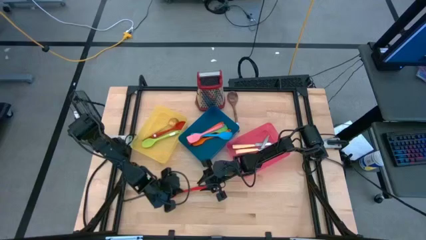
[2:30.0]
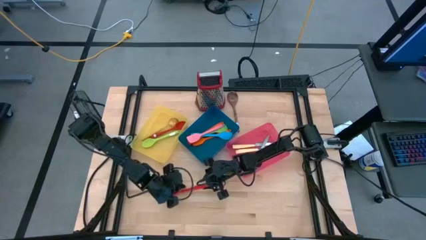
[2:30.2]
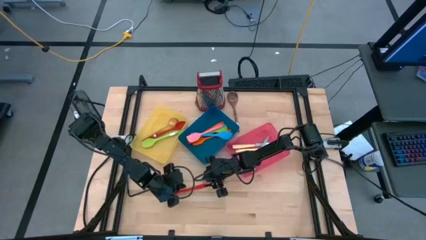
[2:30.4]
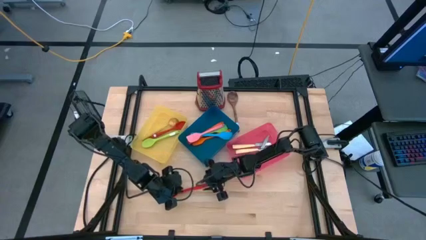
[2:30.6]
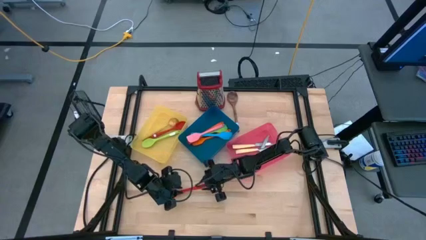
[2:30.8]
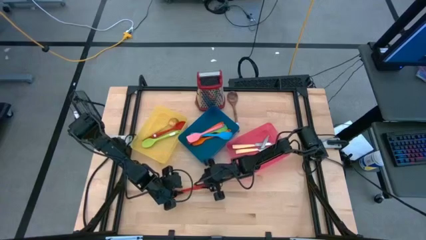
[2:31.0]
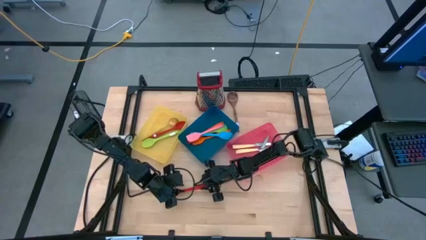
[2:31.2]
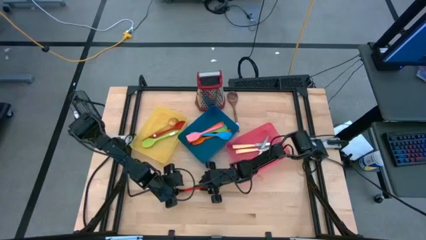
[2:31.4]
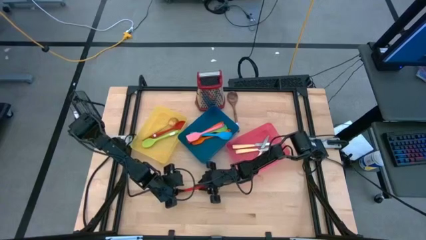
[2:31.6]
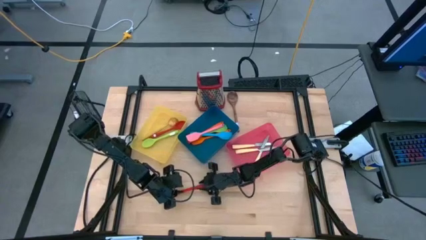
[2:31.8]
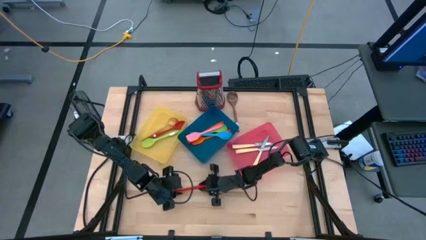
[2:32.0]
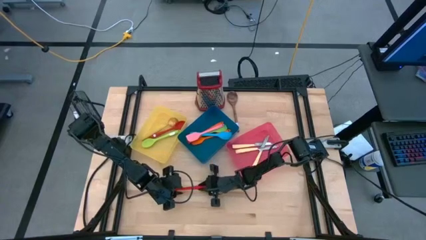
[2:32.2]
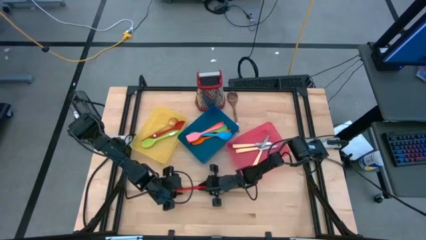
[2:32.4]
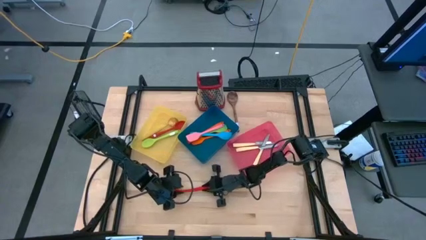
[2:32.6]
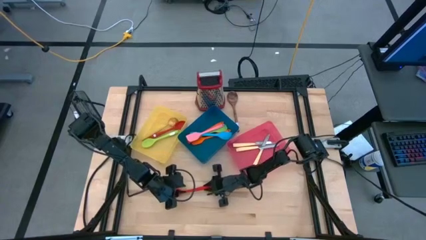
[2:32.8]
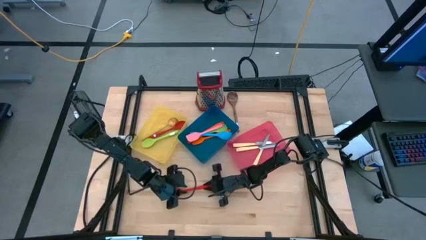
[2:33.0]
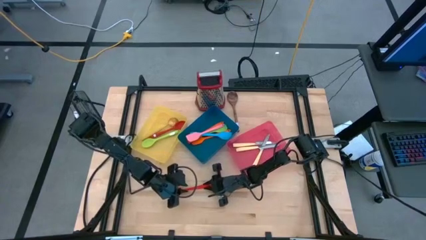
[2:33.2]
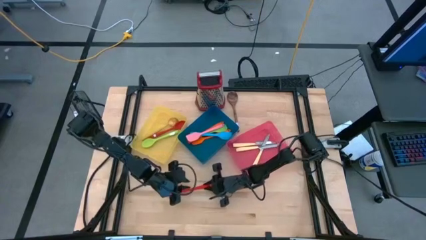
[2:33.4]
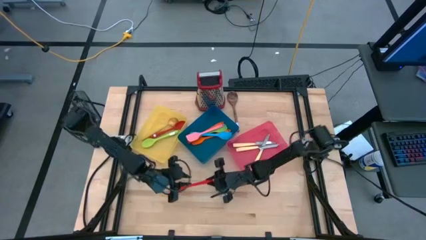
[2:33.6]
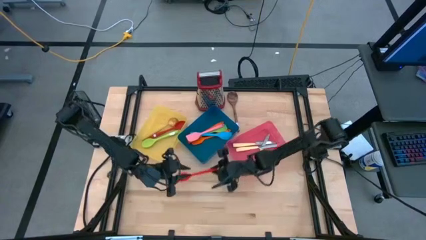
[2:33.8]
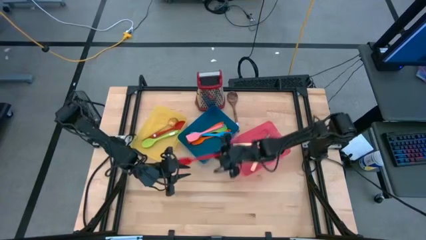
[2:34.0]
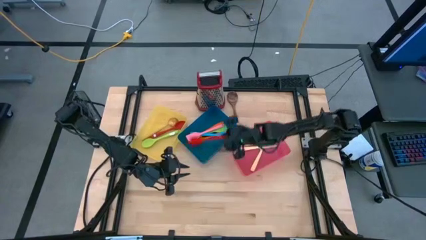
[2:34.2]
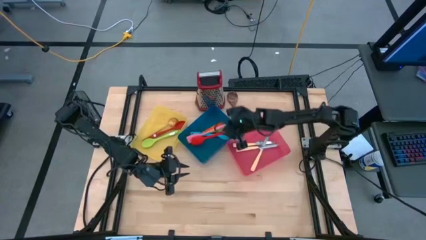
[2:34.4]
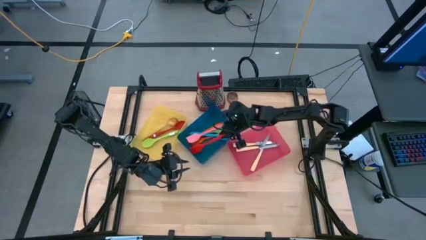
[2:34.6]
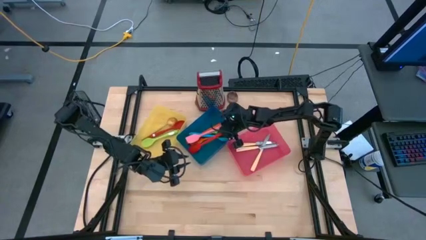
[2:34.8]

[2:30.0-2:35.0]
Task: Pick & Place Kitchen Items
Put the red spatula into the blue bin

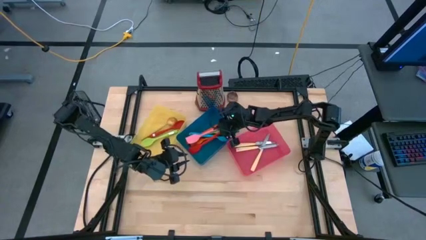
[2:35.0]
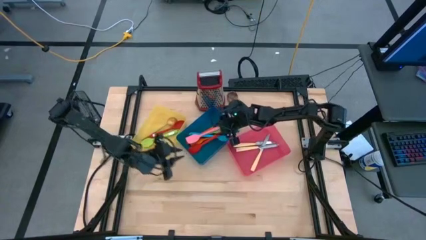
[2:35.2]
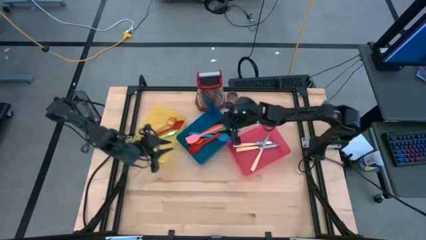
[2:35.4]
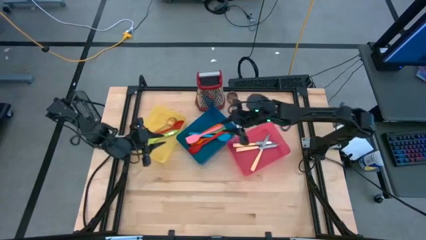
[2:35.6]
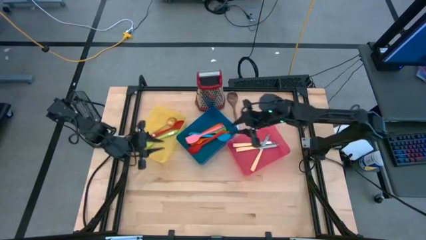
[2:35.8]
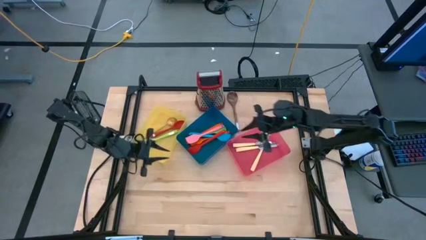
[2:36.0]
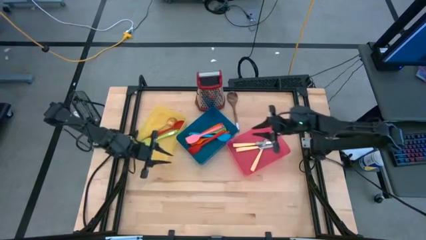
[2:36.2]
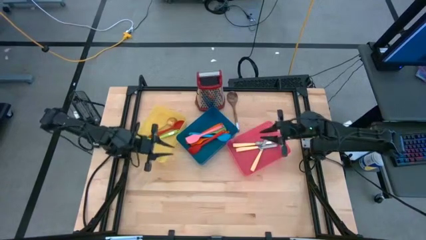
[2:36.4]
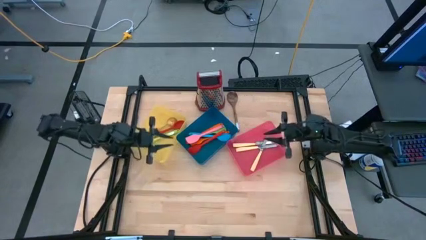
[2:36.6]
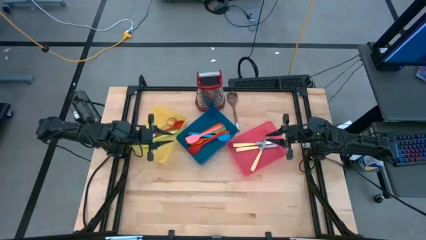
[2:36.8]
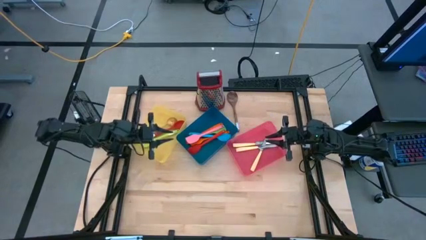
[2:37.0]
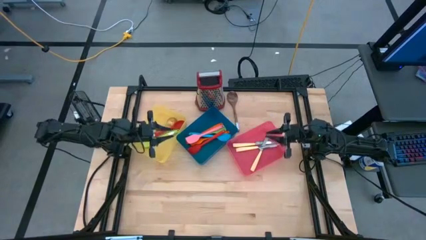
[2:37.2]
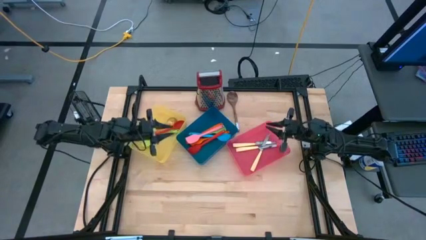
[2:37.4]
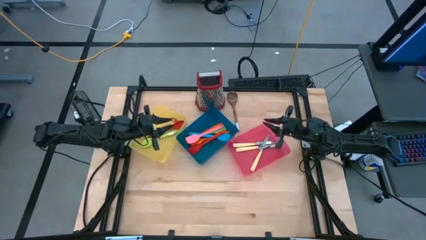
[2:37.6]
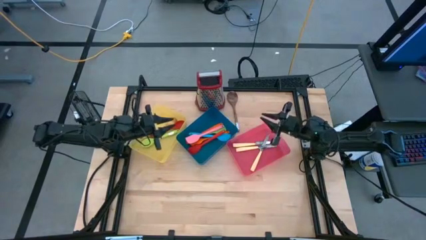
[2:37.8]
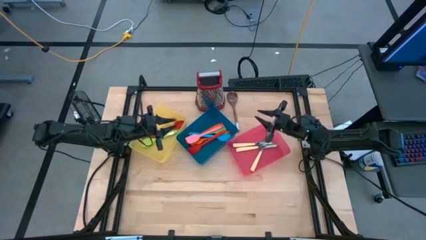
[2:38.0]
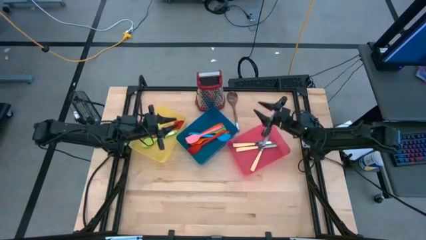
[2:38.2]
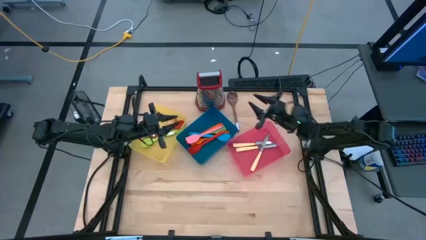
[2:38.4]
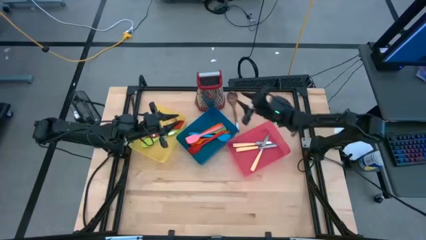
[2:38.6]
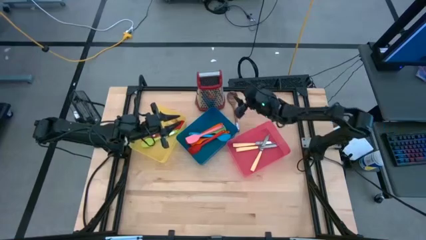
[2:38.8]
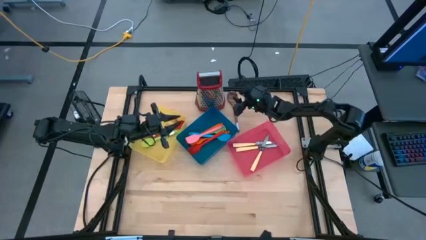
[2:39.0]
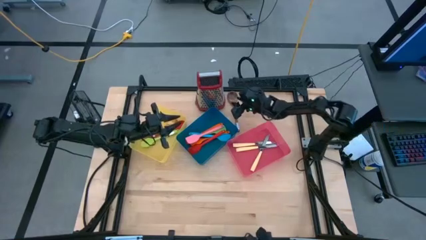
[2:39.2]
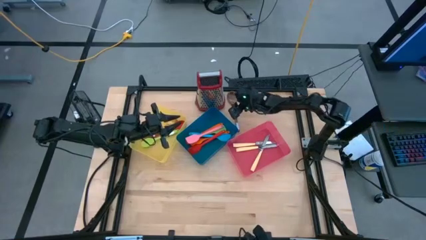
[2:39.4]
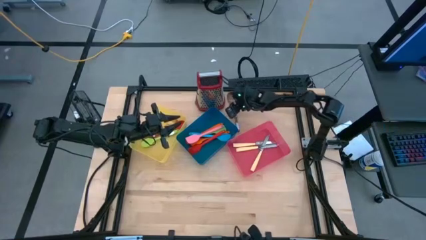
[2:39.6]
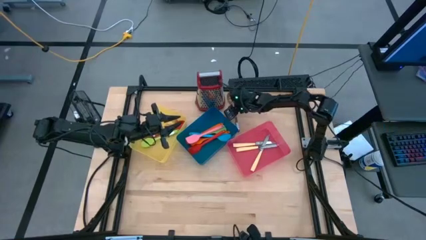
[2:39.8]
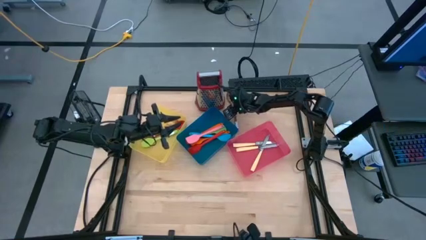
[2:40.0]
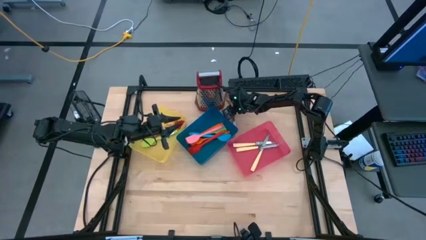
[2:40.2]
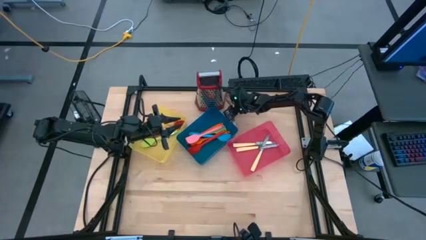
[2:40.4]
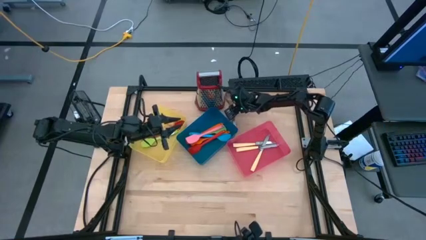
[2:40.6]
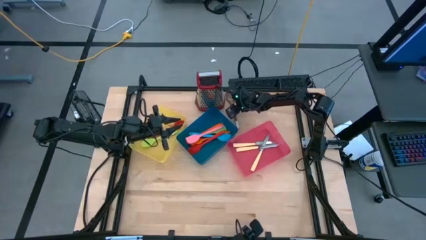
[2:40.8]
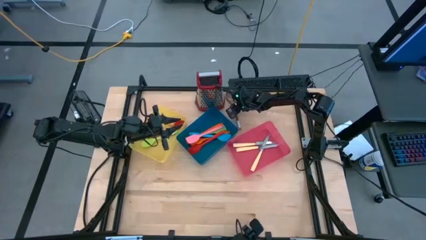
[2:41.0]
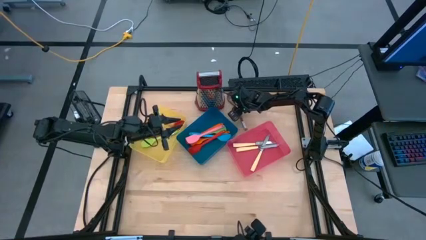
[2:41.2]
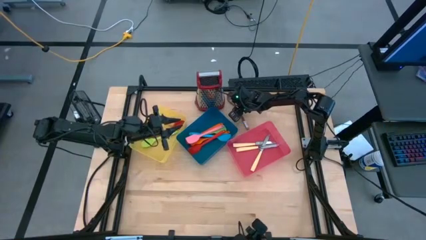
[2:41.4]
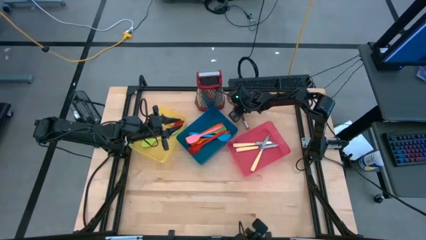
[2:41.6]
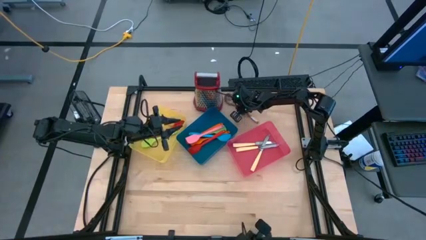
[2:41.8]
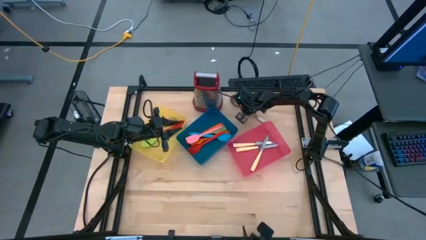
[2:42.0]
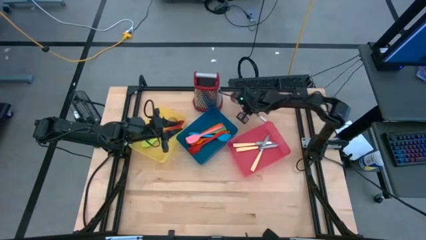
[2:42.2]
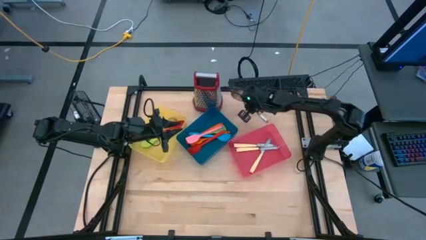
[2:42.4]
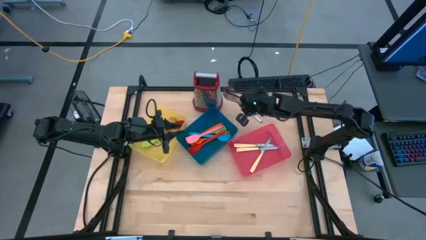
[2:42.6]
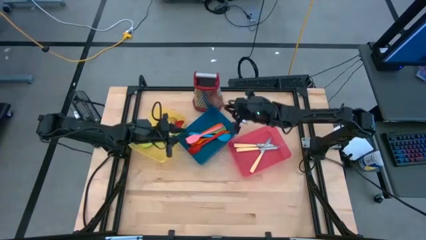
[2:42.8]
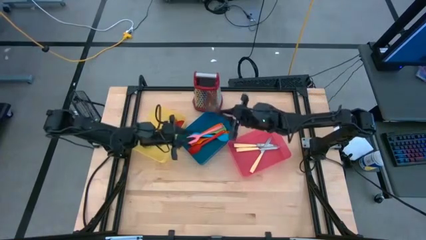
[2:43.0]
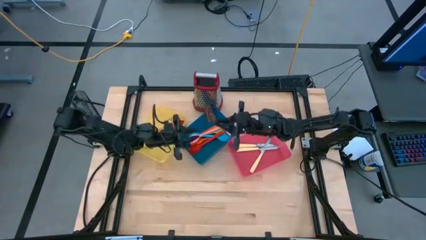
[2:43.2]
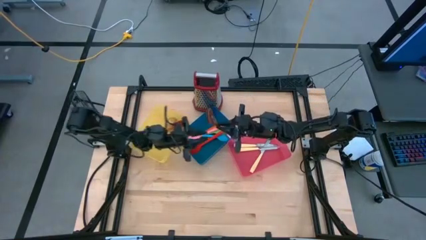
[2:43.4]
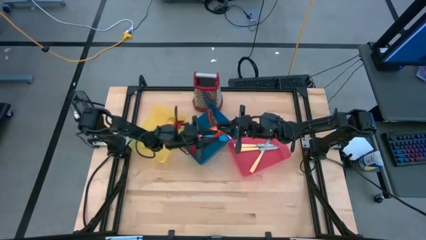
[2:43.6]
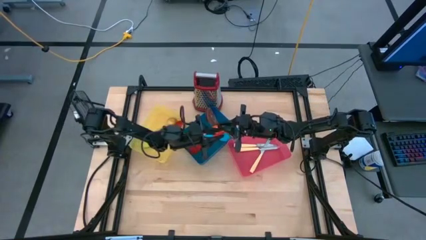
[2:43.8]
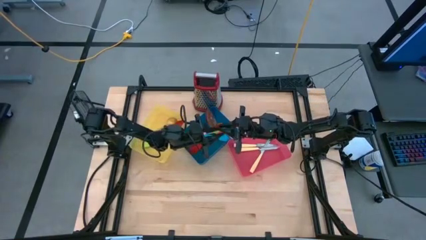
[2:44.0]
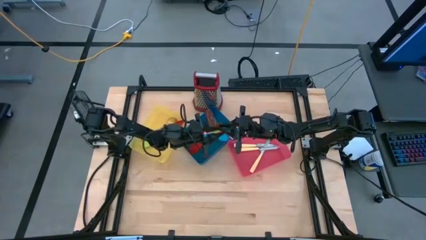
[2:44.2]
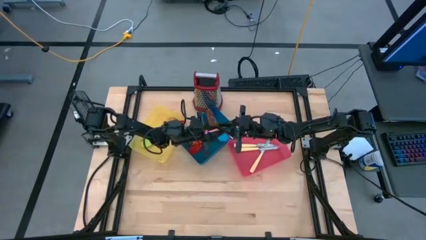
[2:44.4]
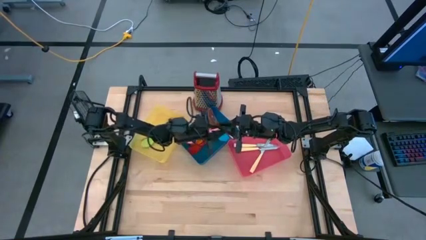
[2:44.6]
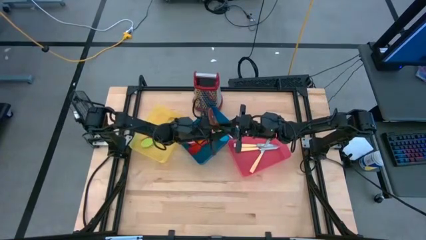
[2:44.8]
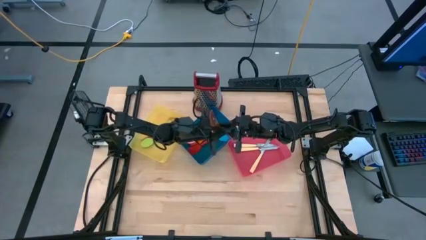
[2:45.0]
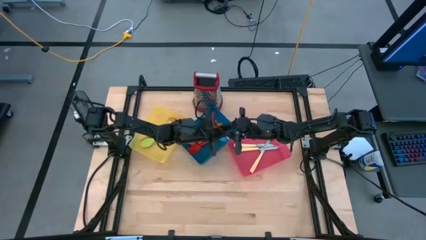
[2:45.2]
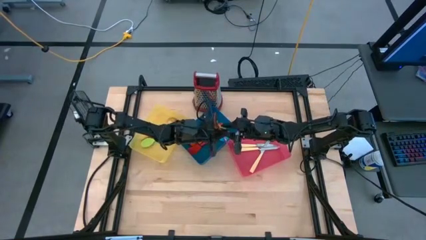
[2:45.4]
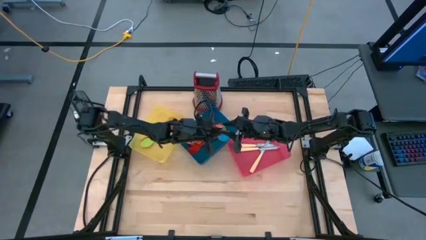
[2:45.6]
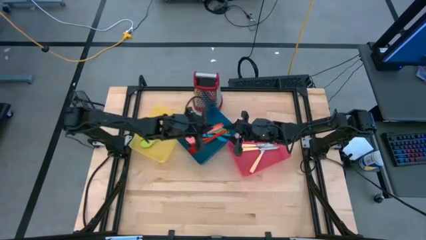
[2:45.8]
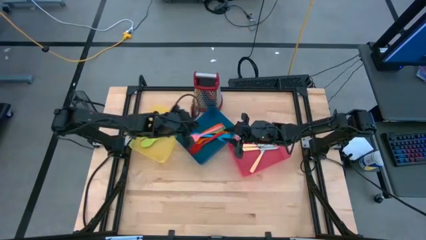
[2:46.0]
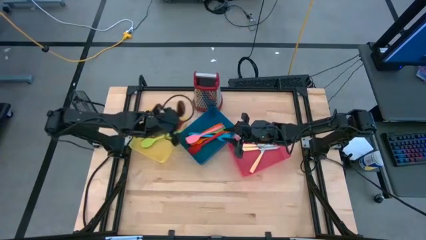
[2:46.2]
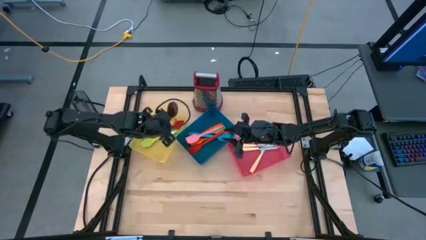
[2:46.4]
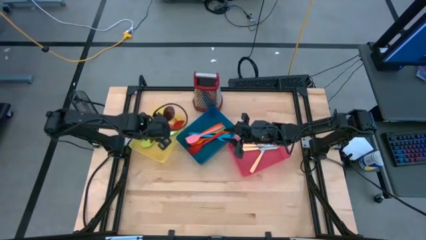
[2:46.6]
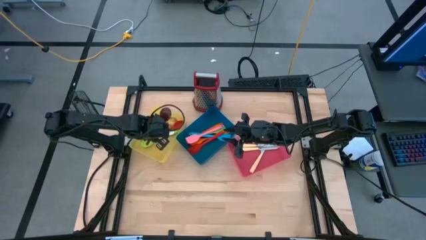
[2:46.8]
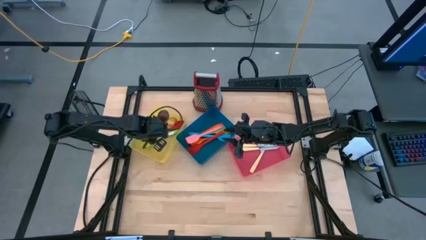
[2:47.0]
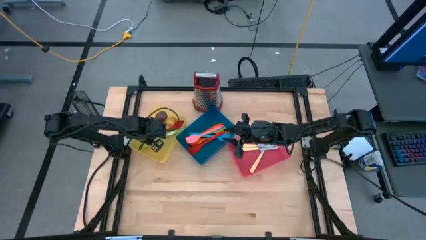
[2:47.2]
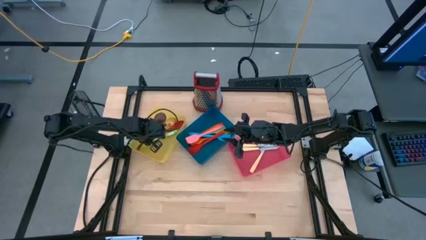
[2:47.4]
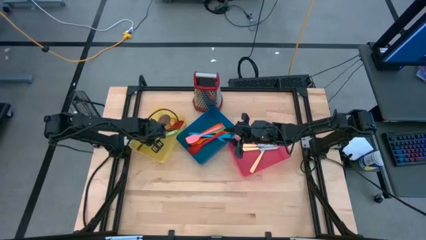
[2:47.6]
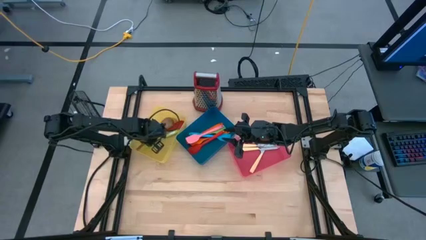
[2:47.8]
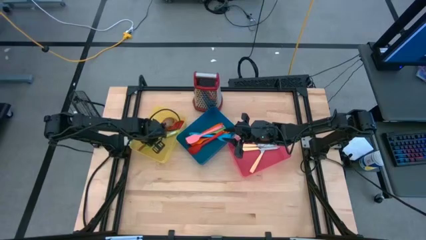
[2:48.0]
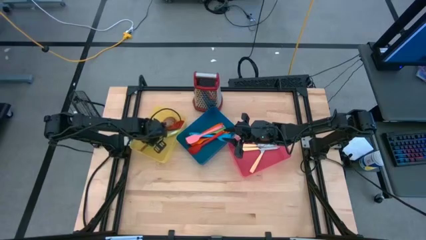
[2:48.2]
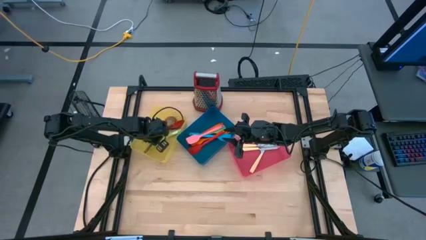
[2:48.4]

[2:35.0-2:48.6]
Put the brown serving spoon into the yellow bin
